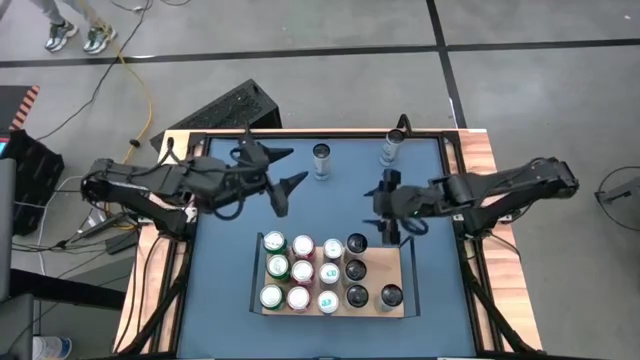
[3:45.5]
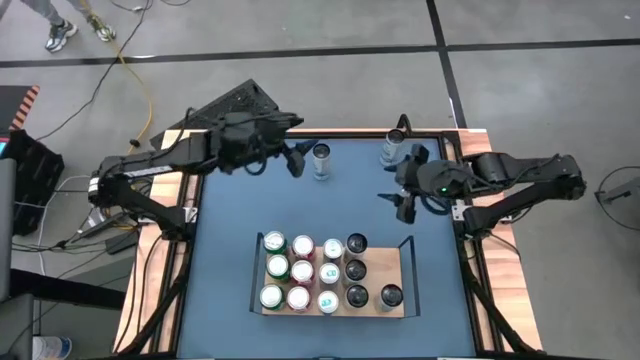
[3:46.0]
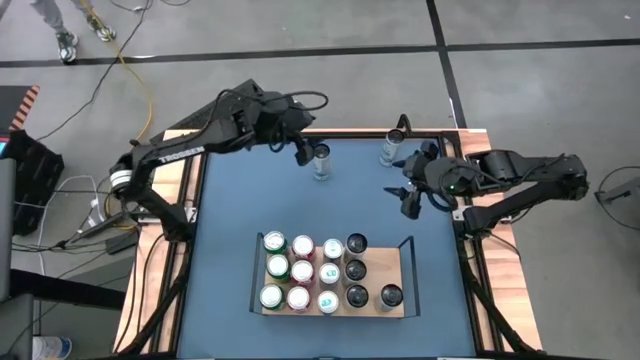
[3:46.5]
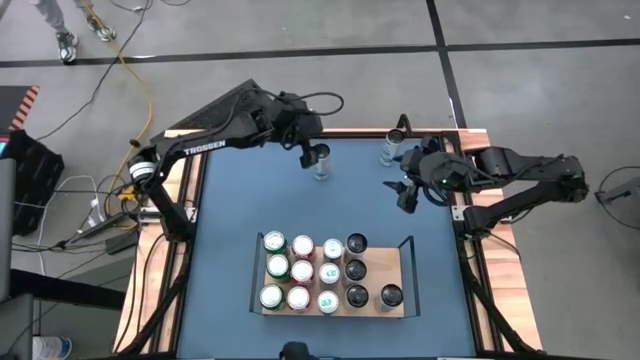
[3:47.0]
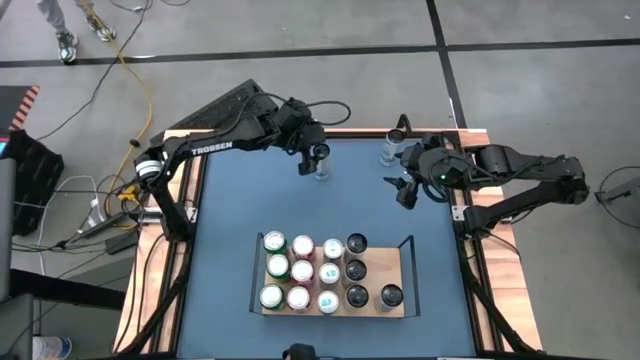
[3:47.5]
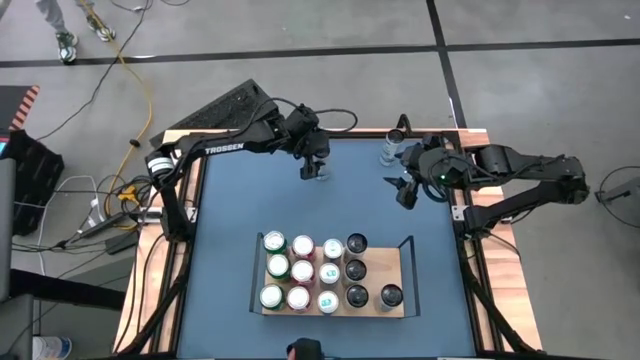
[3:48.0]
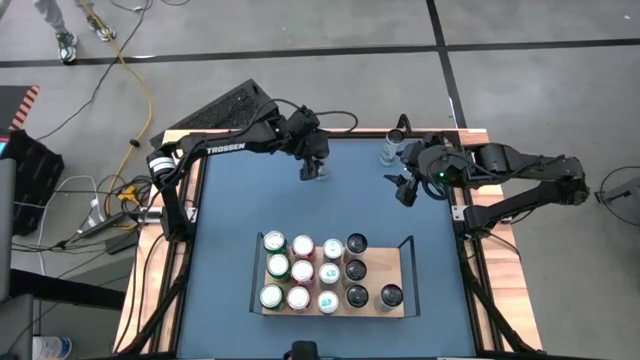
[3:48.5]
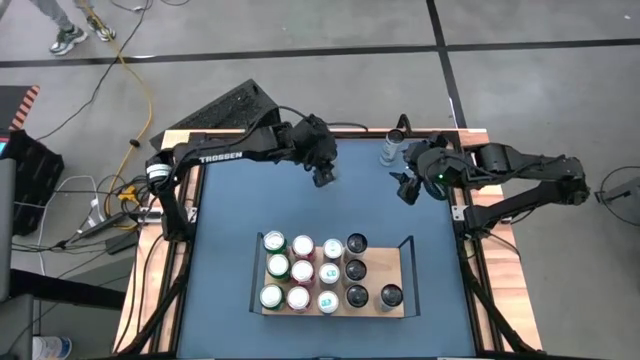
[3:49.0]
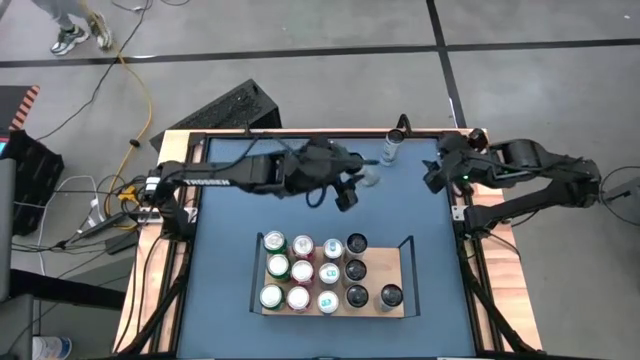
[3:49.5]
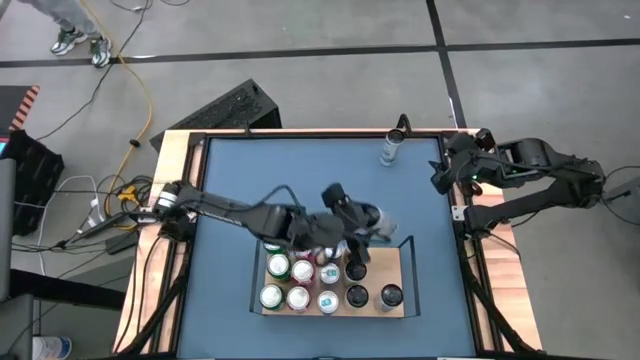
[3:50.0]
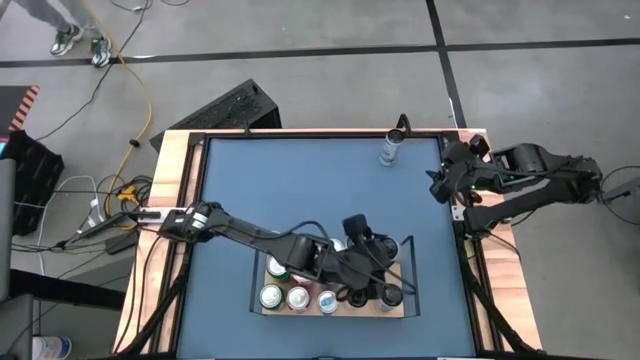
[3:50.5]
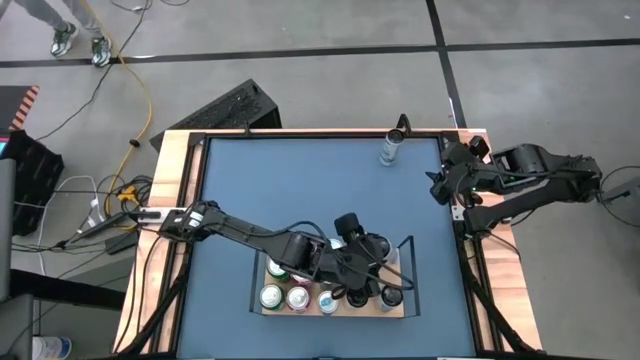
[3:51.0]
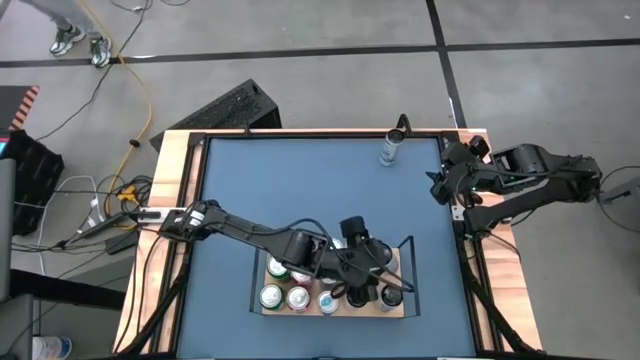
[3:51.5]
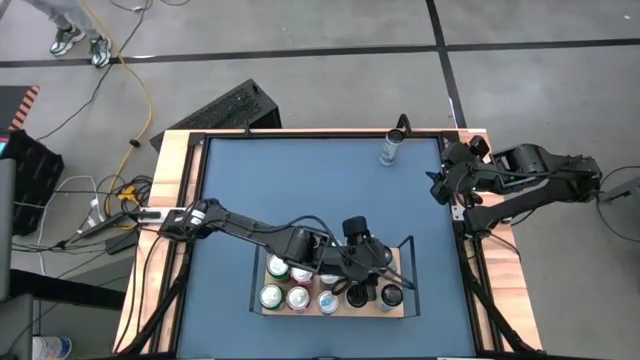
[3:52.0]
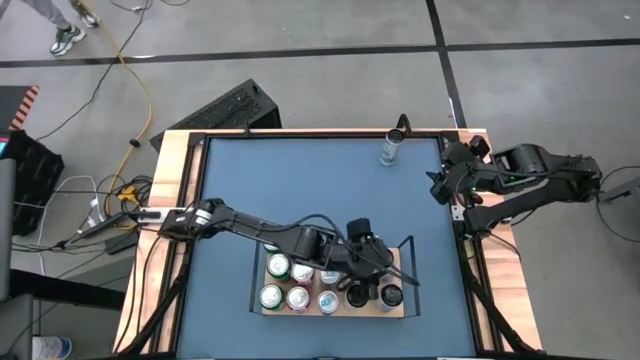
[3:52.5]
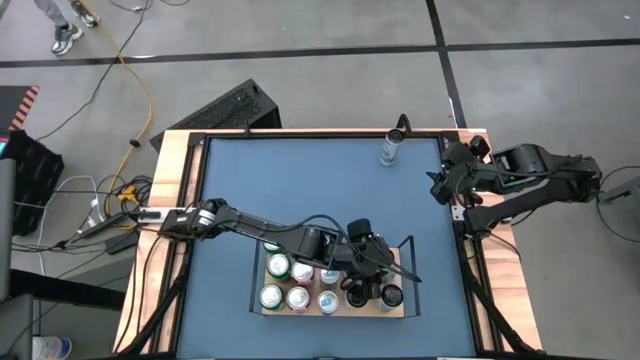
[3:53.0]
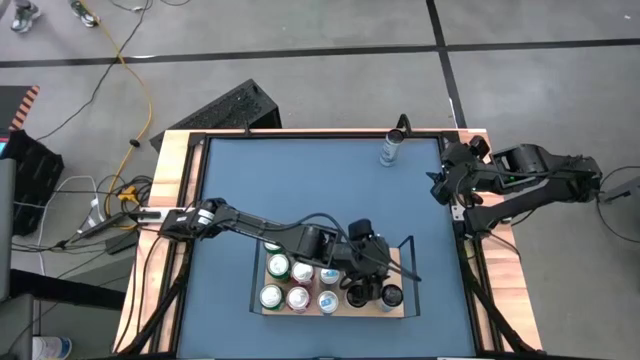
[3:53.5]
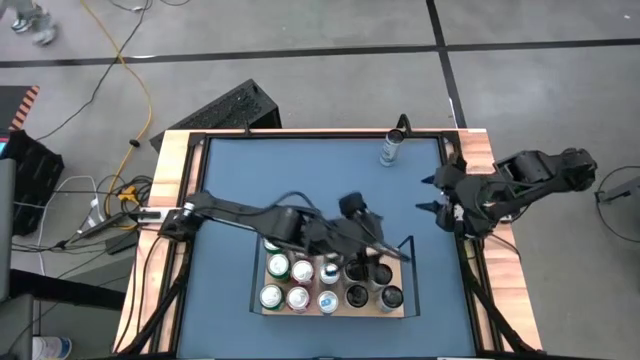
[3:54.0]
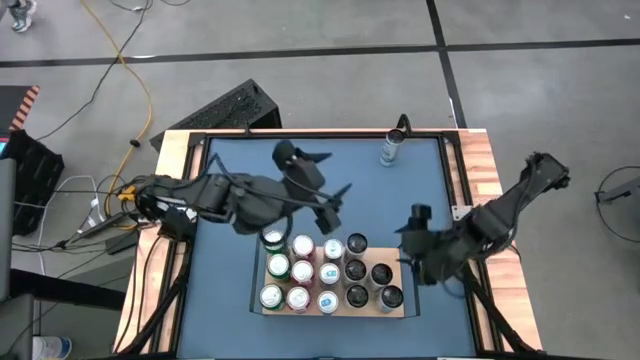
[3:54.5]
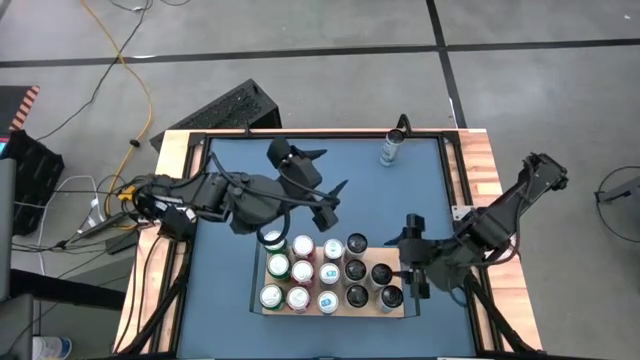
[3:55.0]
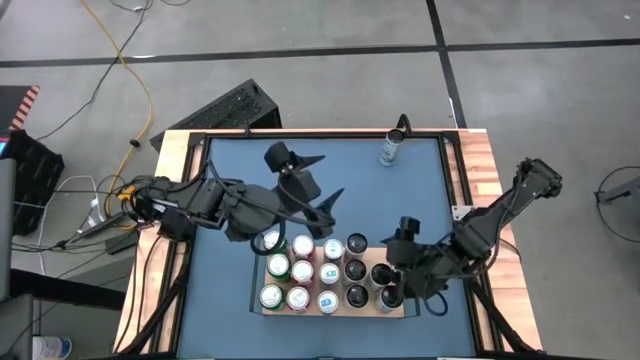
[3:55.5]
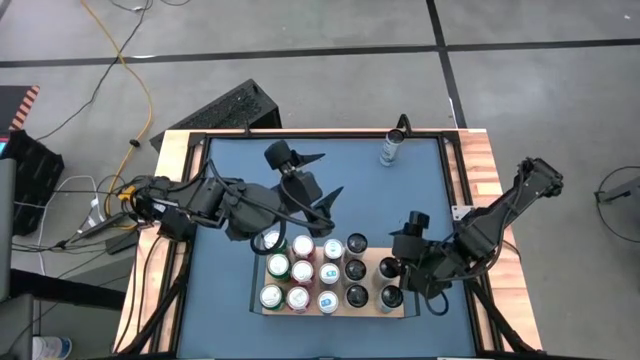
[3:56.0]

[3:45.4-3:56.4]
Task: Place canned beverage on shelf
Put the bottom white-blue soda can on the shelf aligned with the other white-blue soda can

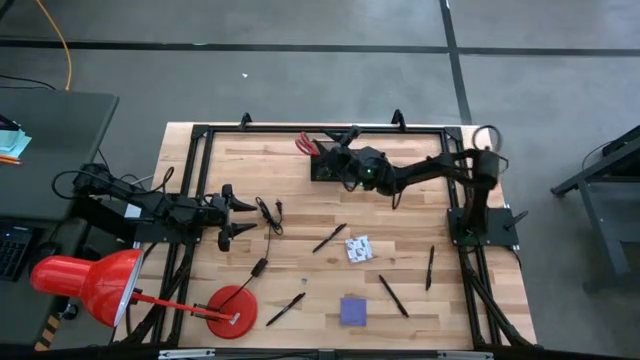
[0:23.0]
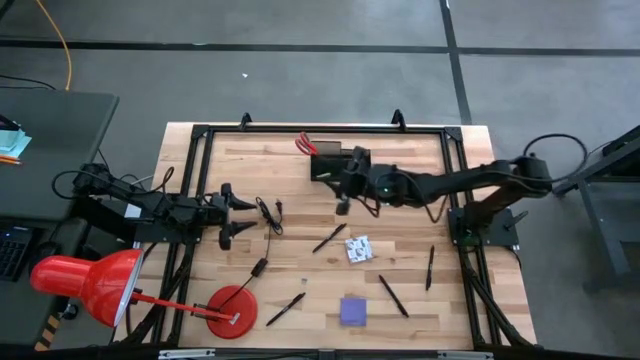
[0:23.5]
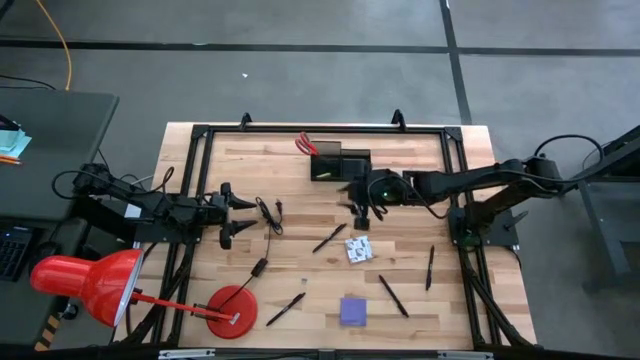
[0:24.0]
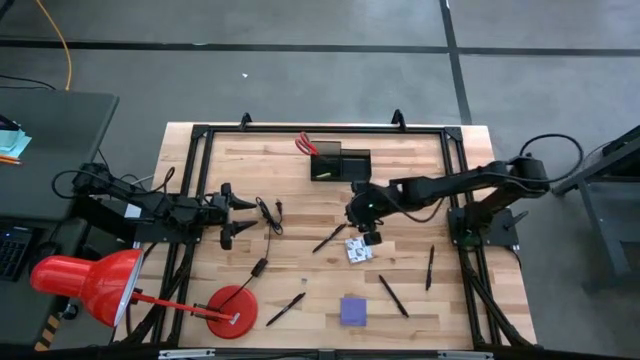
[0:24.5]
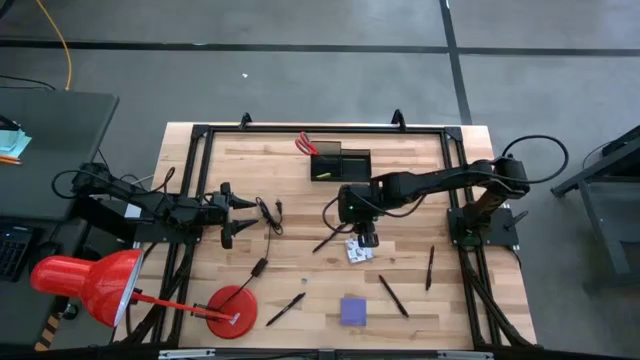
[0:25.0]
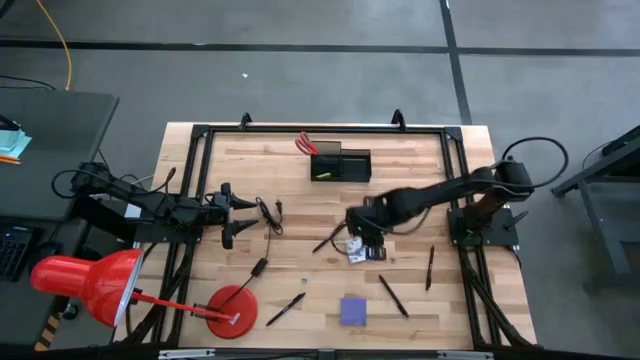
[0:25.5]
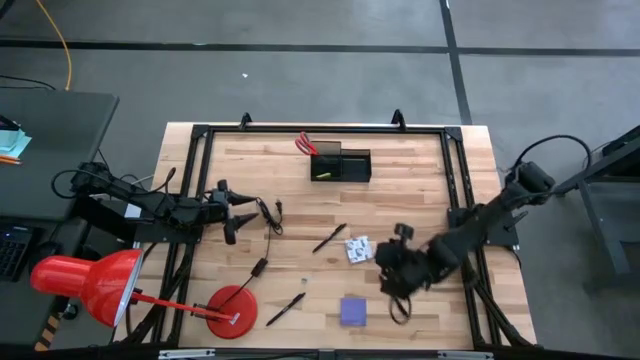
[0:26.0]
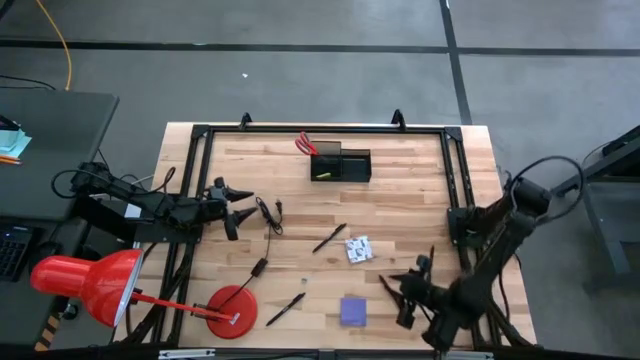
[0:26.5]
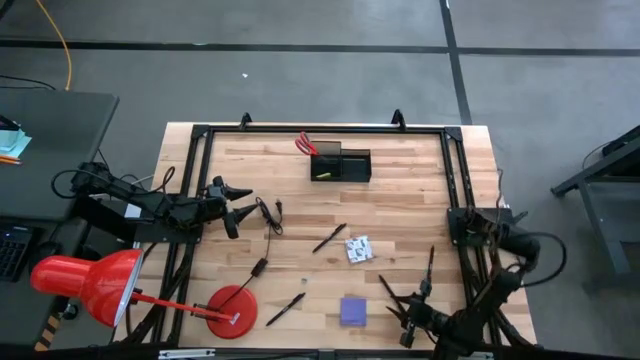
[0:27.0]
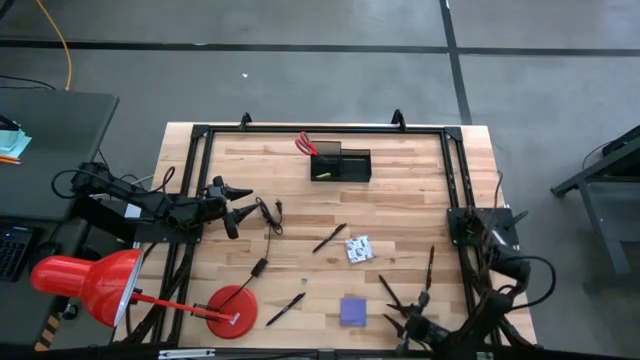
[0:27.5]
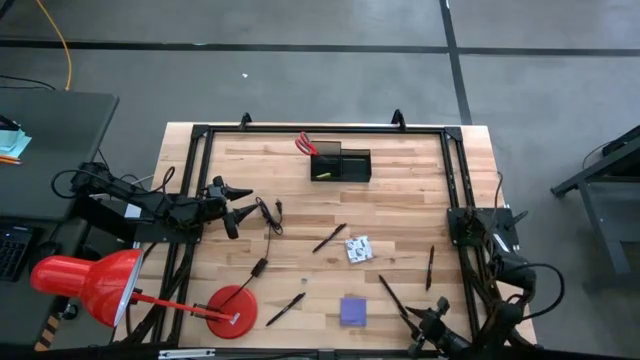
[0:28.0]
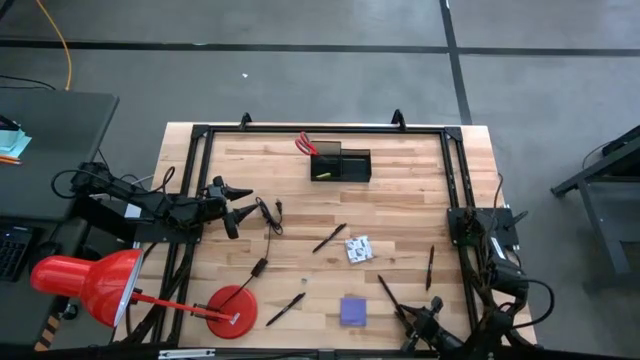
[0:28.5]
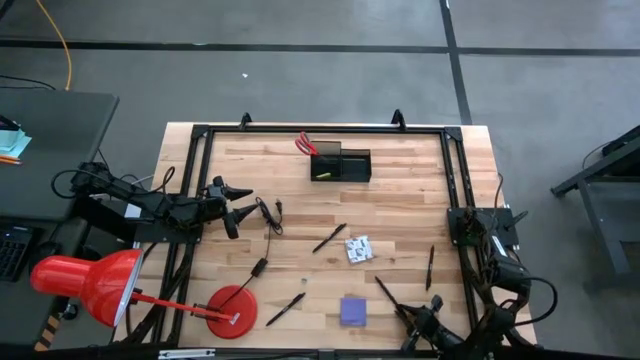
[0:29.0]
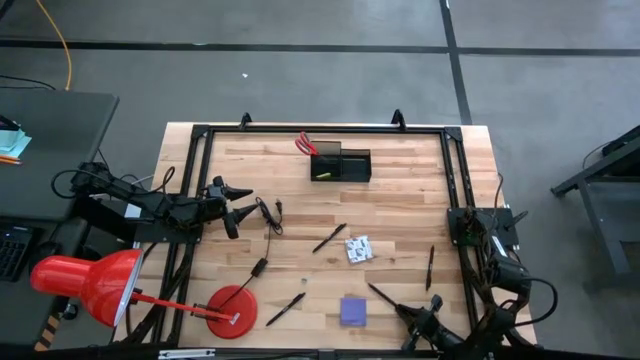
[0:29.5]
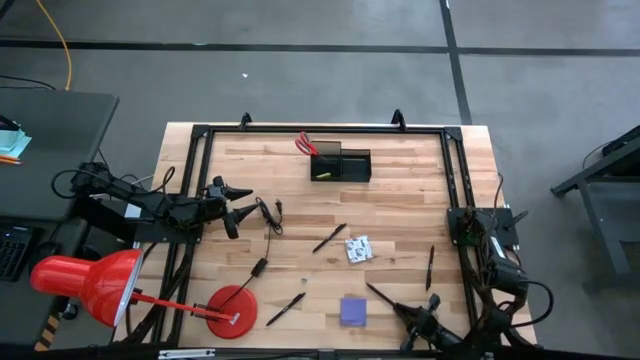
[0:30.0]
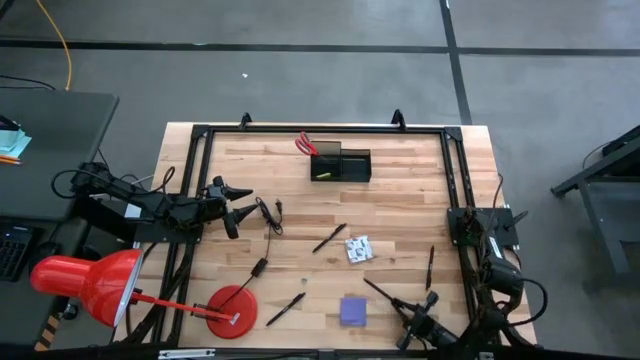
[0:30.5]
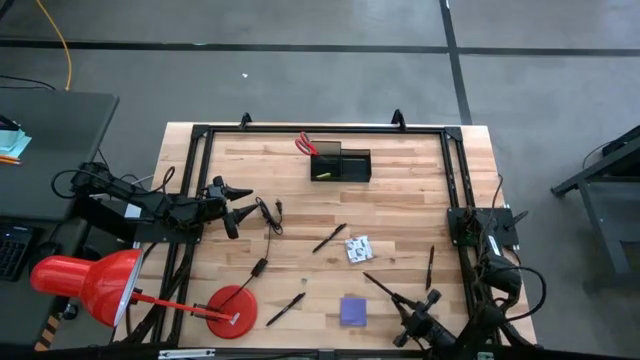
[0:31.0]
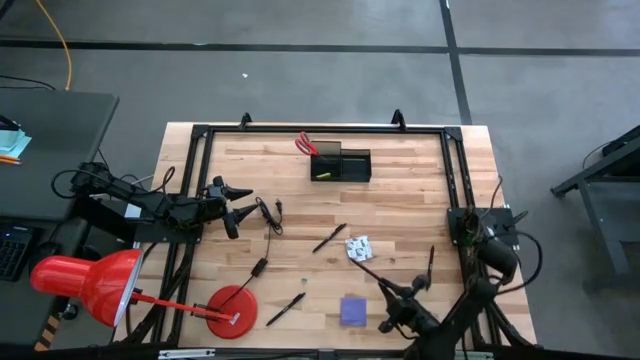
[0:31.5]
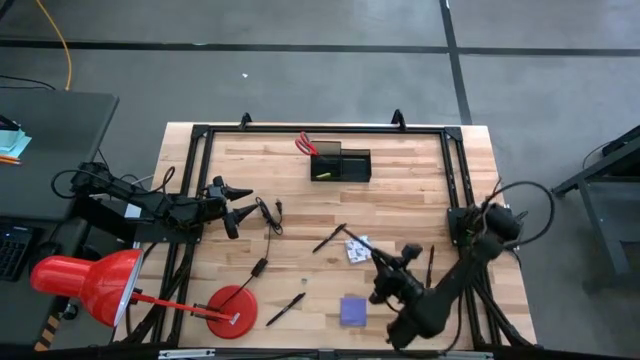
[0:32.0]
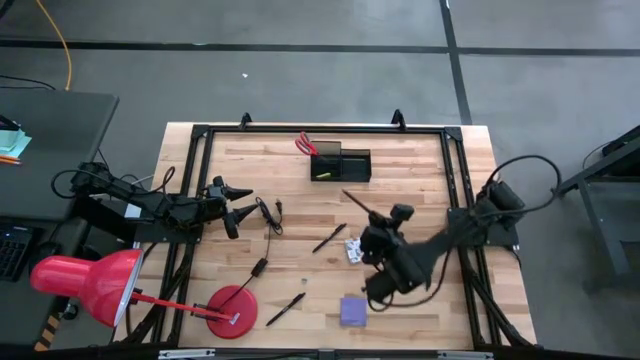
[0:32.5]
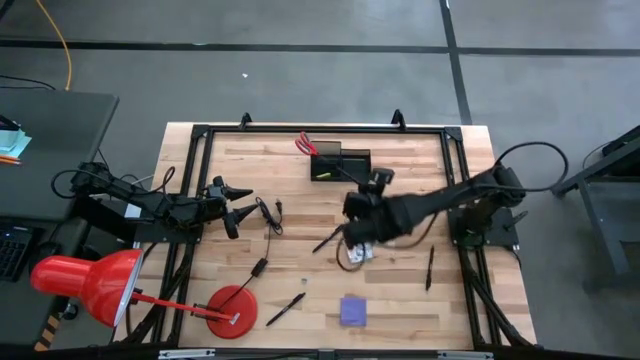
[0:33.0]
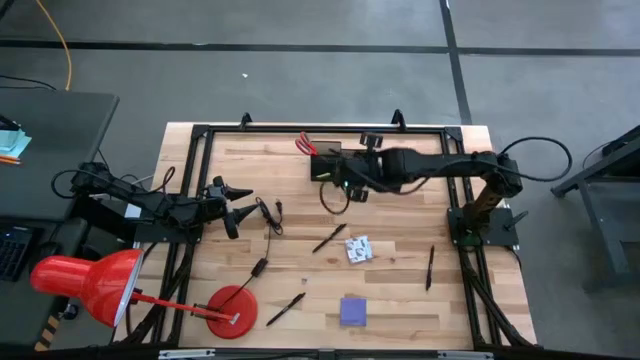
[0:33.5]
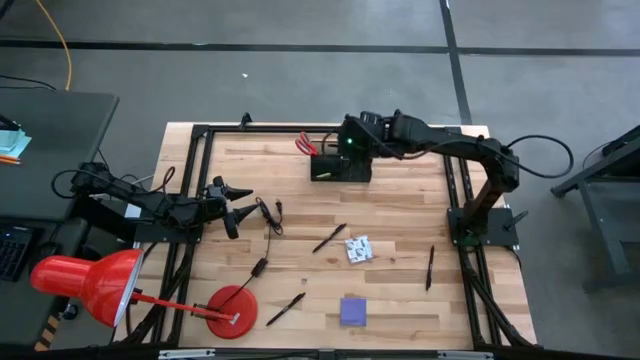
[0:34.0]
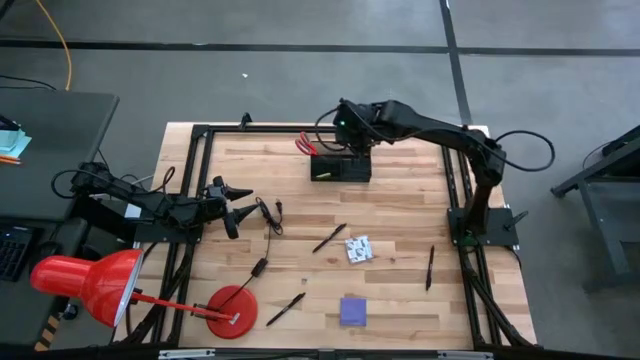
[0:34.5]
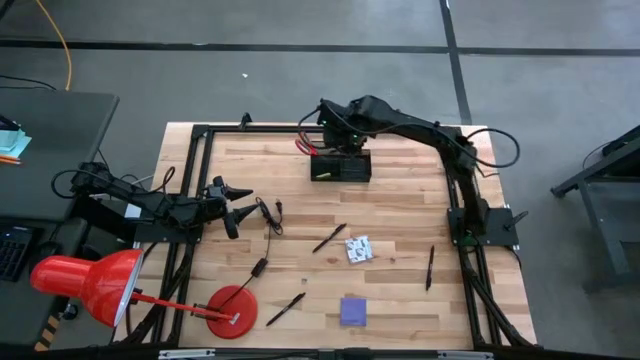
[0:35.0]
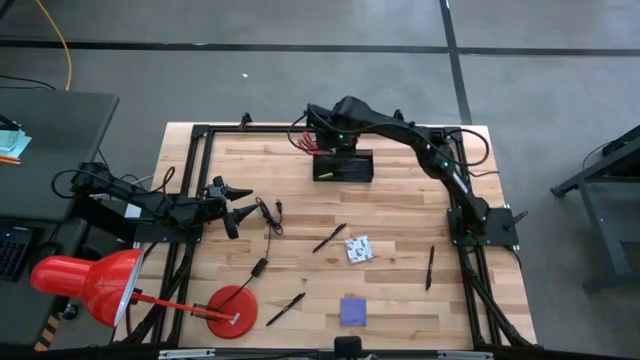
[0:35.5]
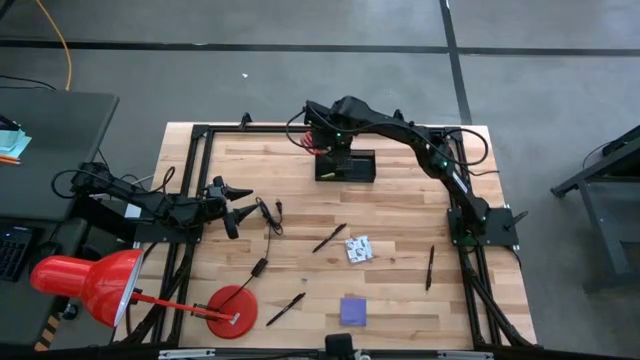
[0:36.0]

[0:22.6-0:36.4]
Task: Pick and place office supplies into organizer
Put the bottom right black pen into the mesh desk organizer
